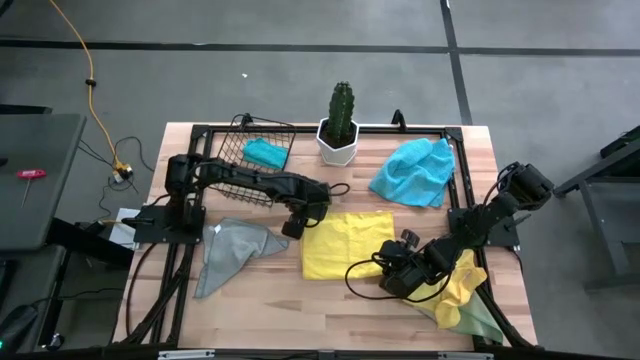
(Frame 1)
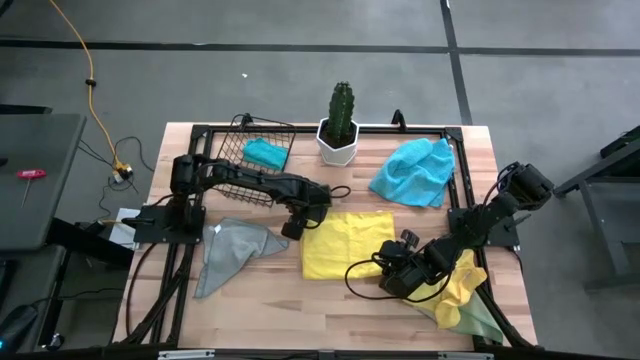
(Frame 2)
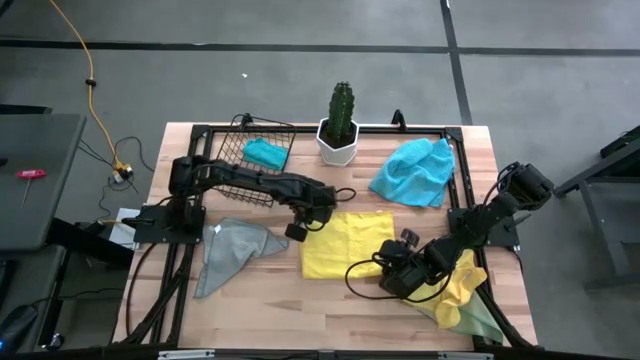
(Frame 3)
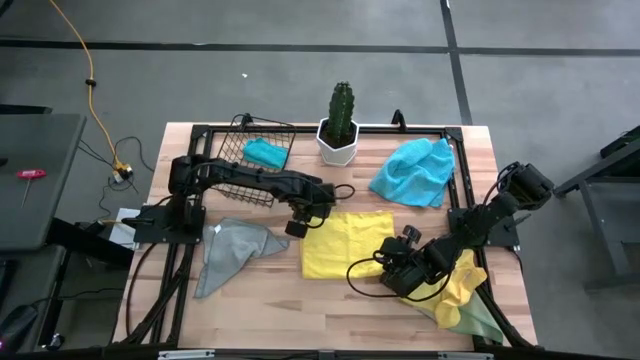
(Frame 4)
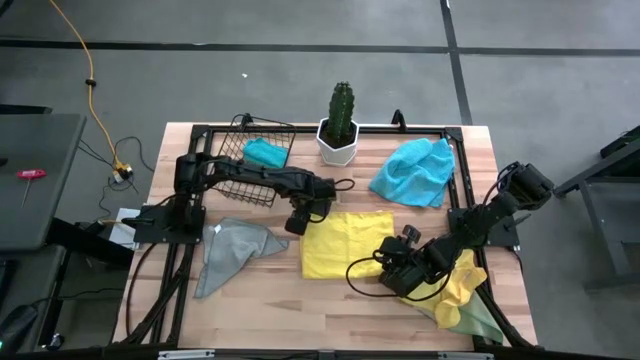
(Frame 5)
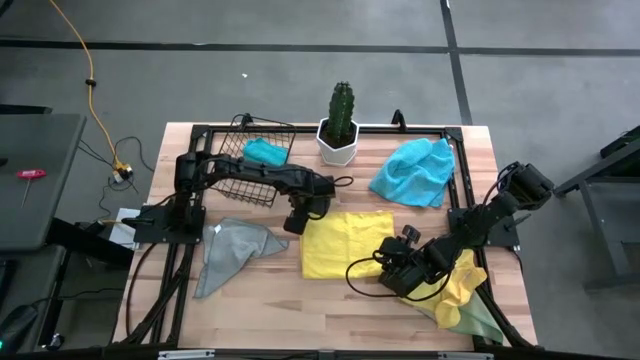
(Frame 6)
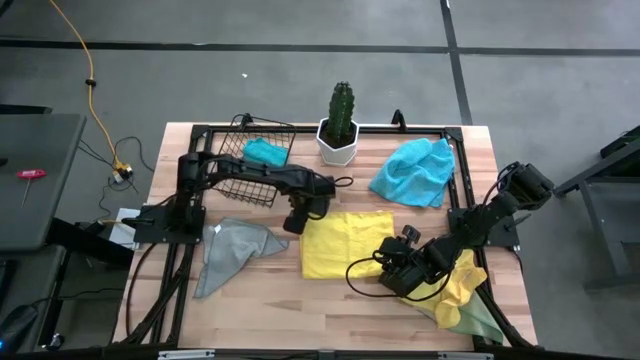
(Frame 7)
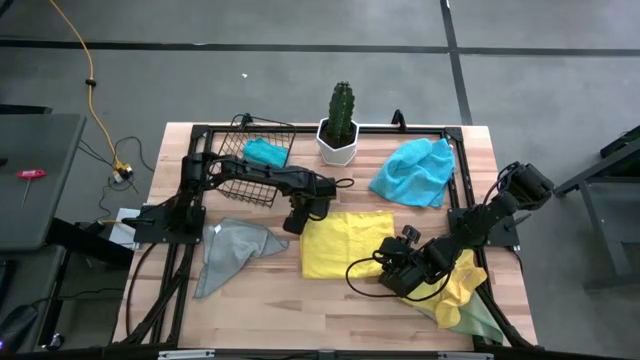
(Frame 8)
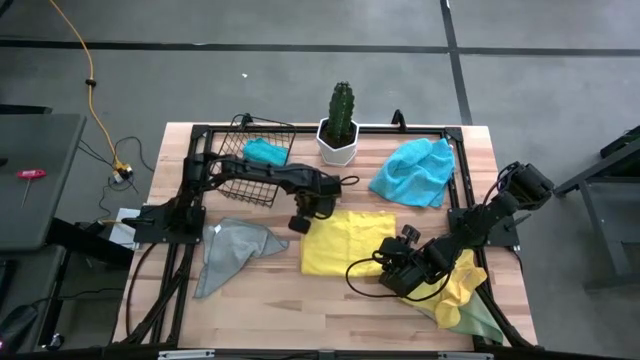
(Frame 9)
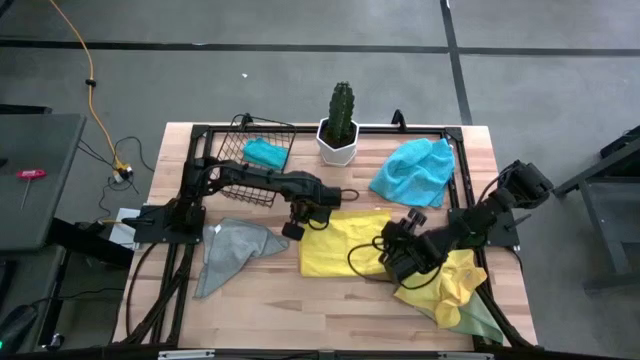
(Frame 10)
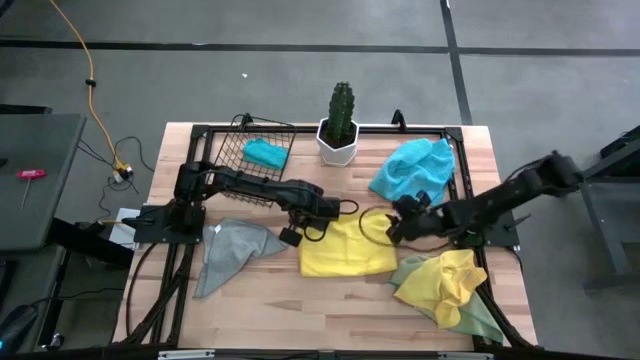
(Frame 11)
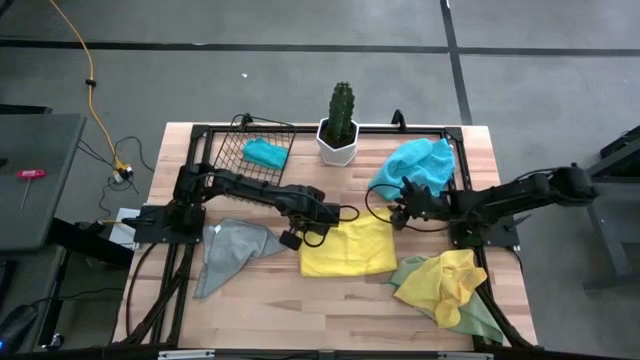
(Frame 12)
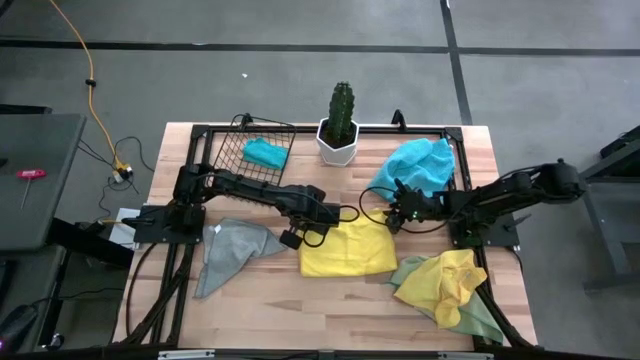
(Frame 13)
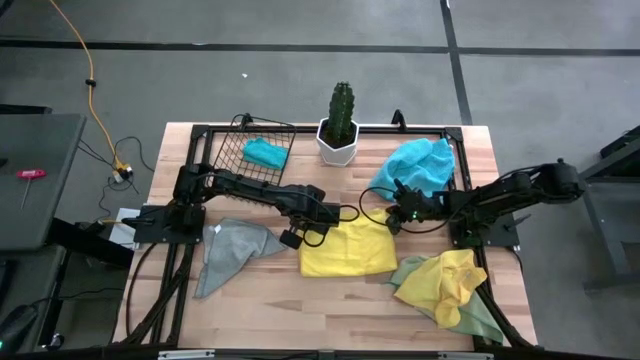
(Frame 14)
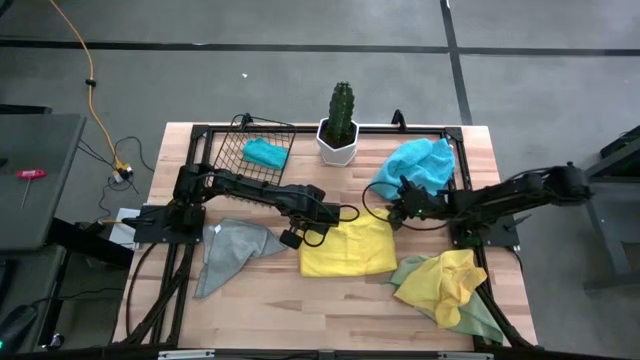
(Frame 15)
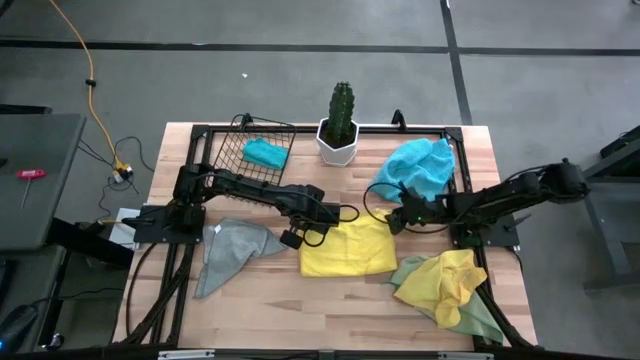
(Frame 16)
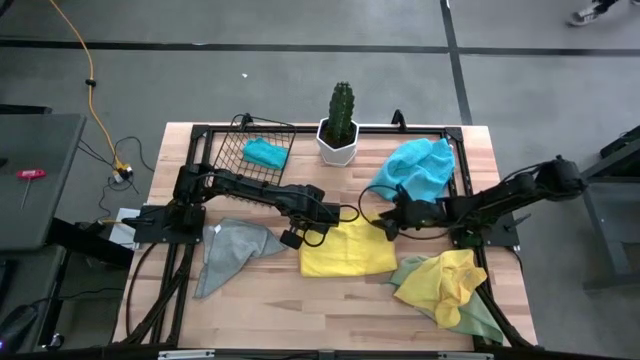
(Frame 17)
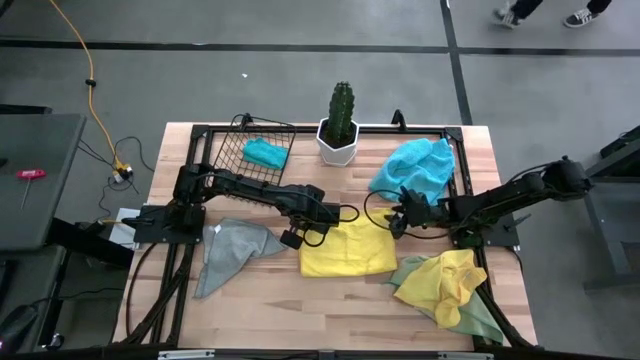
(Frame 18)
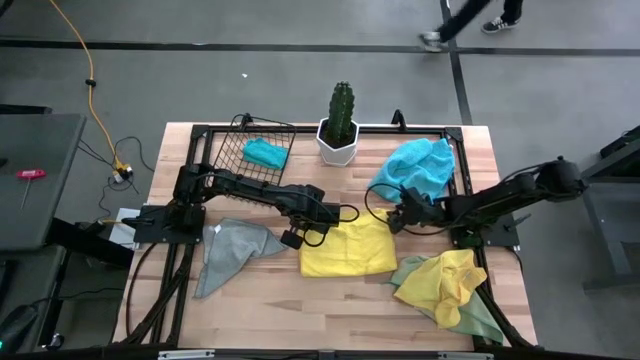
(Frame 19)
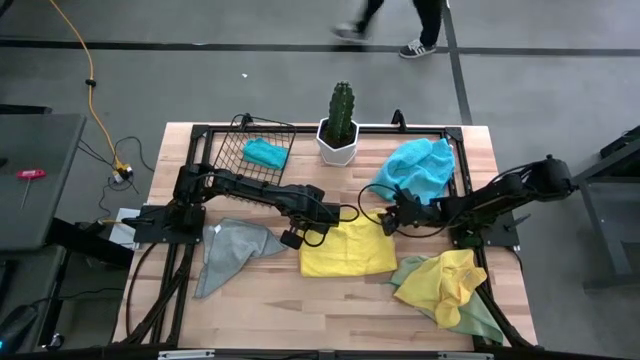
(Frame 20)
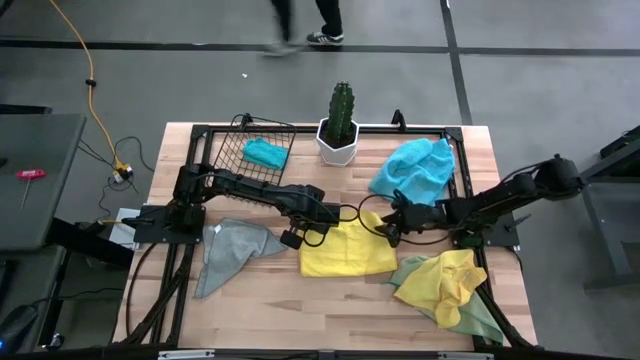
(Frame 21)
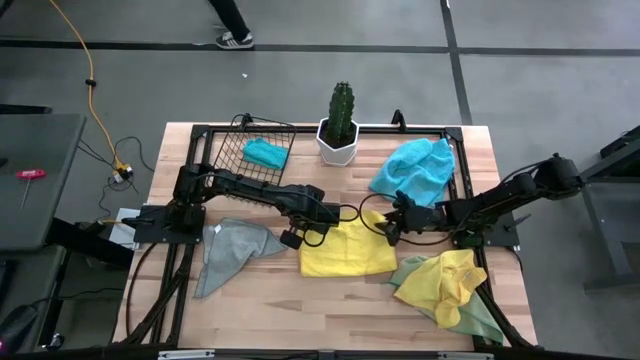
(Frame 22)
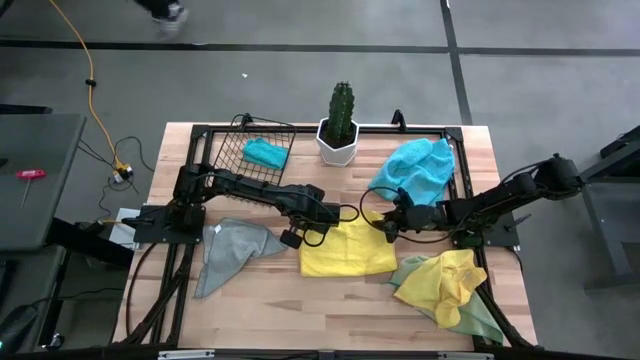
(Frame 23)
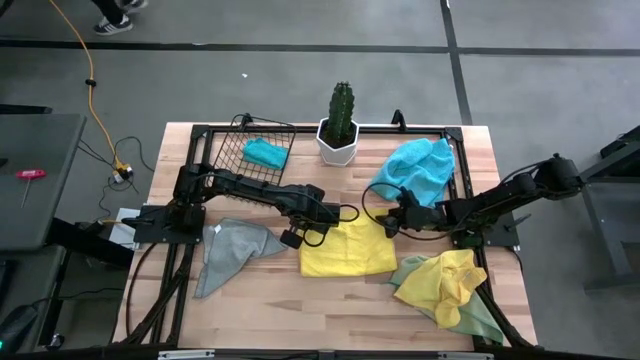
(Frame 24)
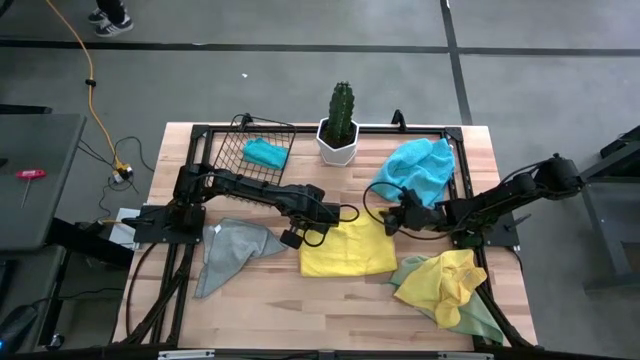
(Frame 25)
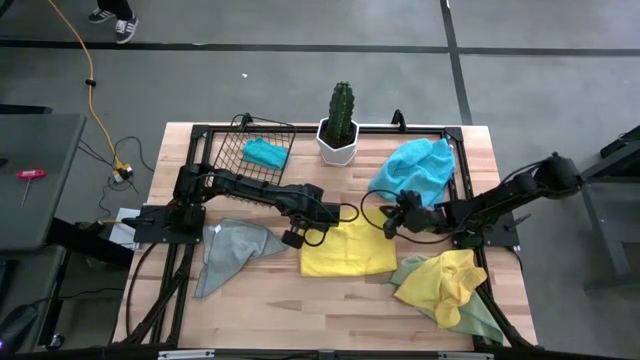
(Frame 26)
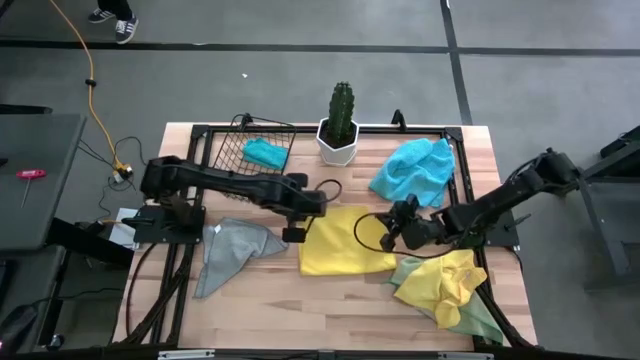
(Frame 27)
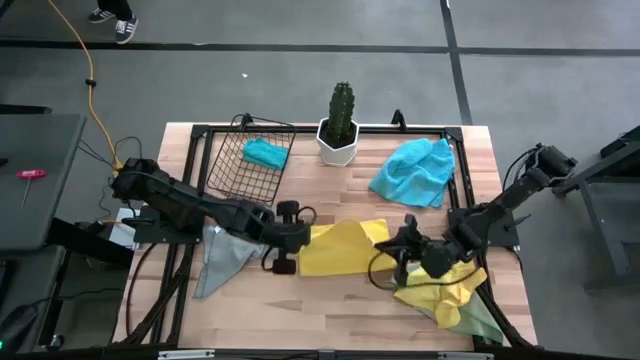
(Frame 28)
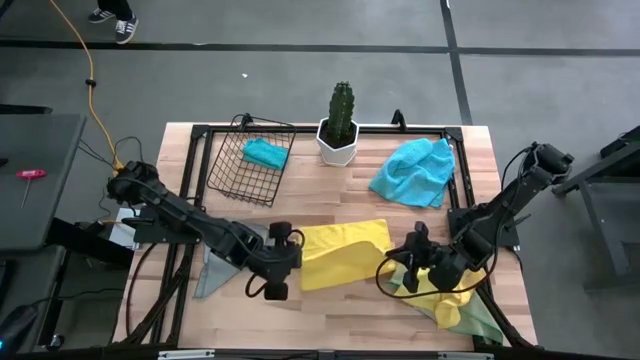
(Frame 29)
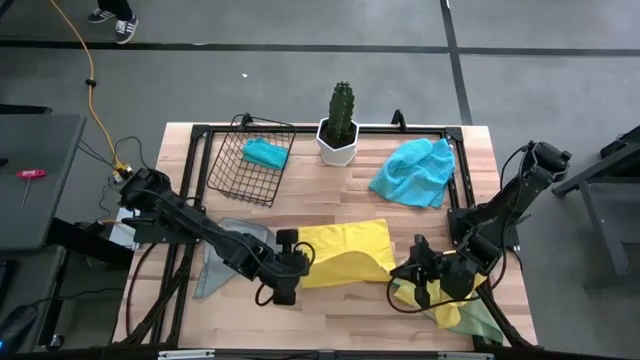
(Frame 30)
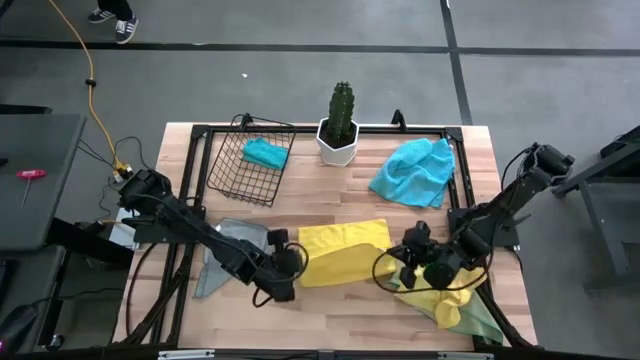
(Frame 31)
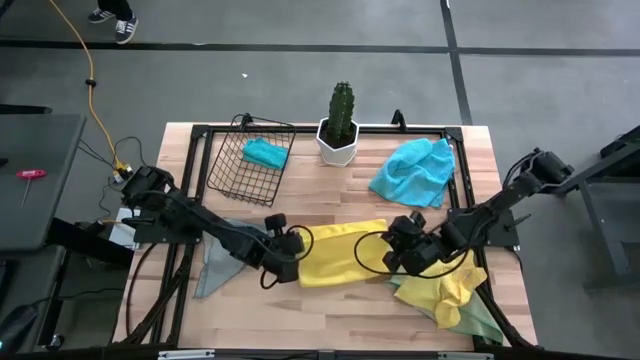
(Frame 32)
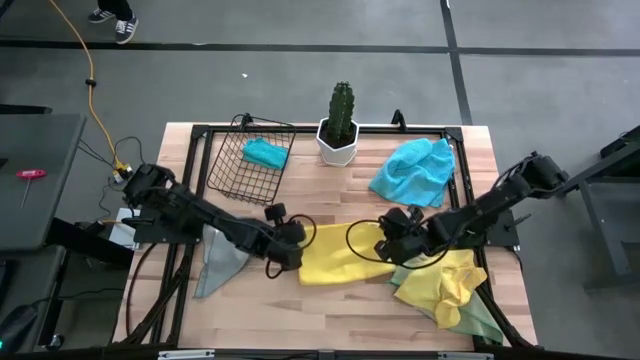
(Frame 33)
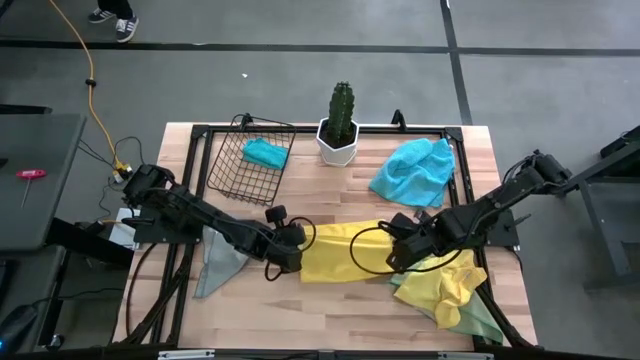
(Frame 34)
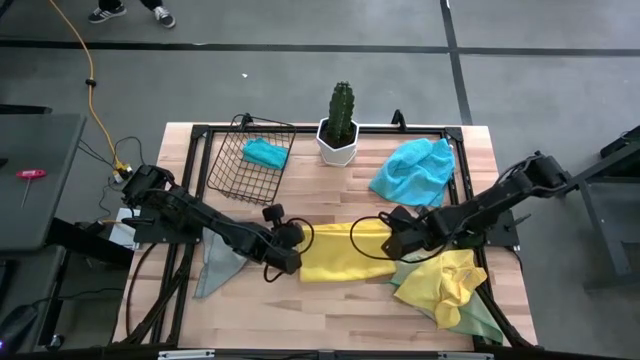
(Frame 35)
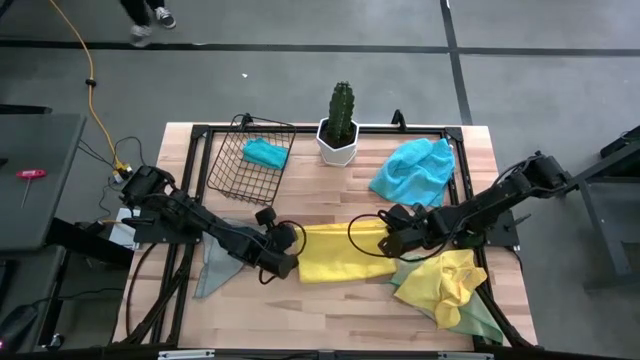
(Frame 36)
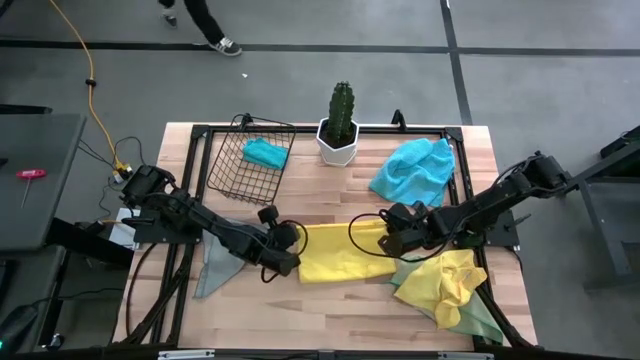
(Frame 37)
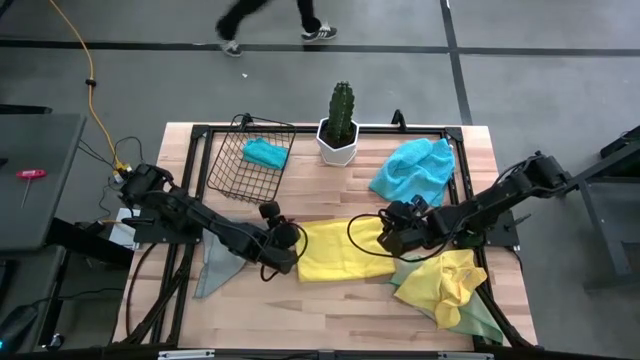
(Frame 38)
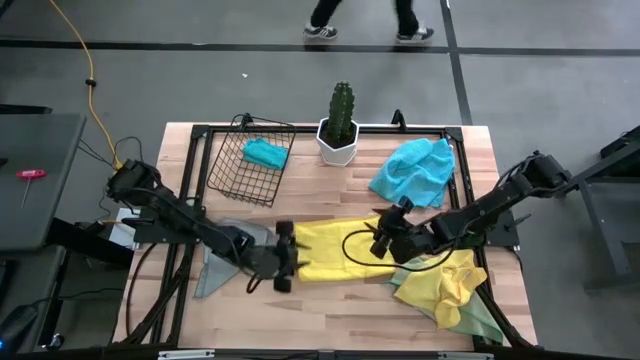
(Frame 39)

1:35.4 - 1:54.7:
Task: Fold microfiber towels
Fold the left yellow microfiber towel on the table

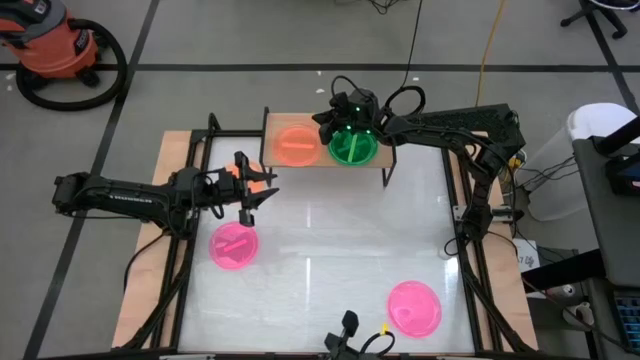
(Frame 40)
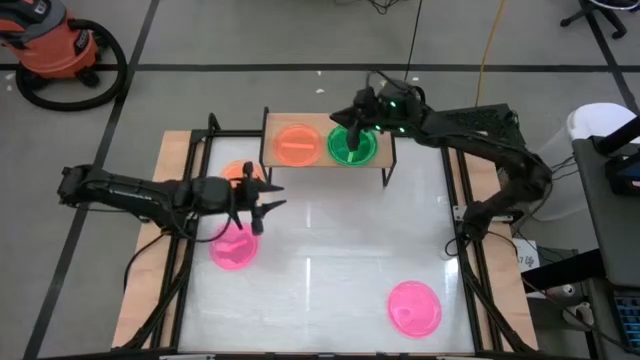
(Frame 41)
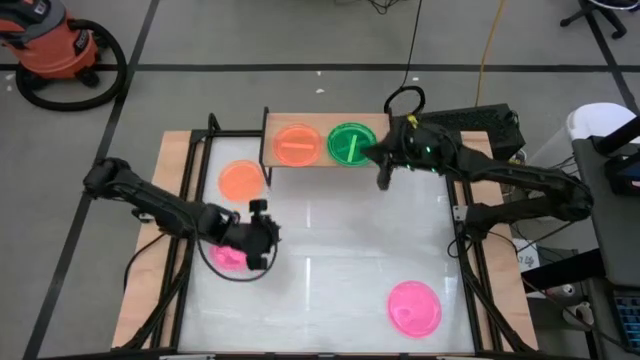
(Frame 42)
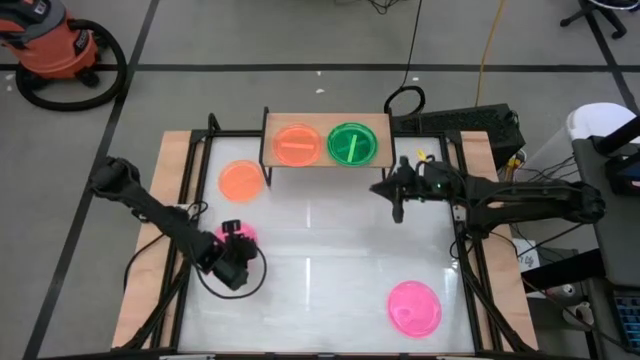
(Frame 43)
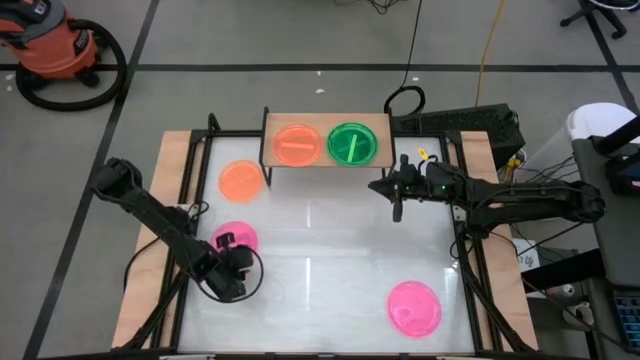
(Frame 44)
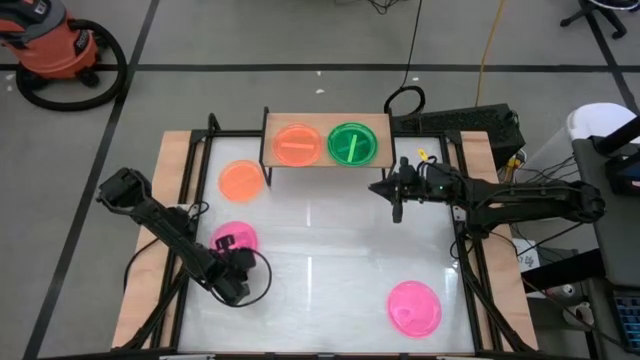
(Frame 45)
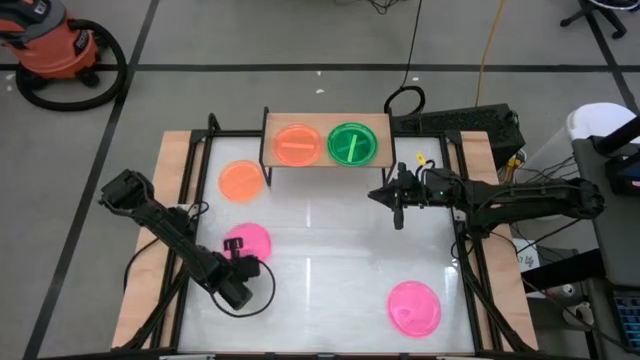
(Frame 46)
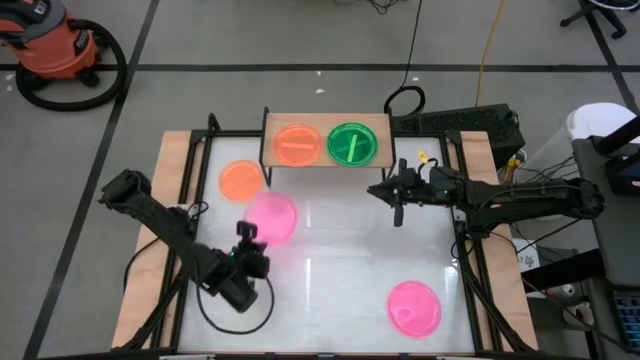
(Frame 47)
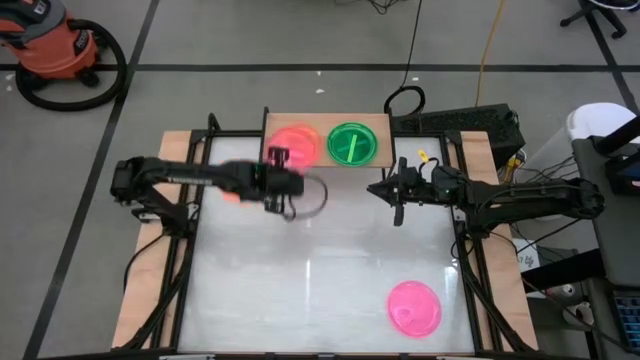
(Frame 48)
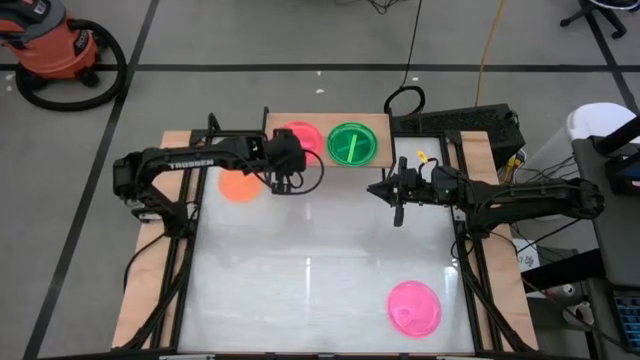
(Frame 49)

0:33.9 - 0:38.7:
Task: Place and stack plates onto a shelf
Stack the left pink transparent plate on the orange transparent plate on the shelf
